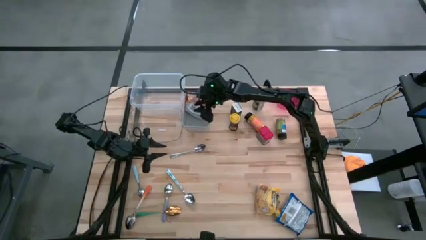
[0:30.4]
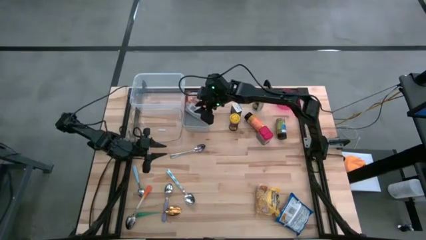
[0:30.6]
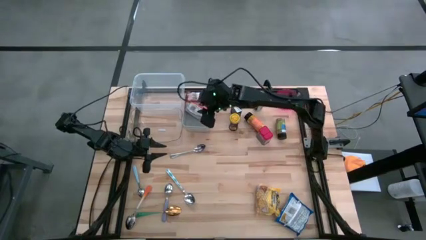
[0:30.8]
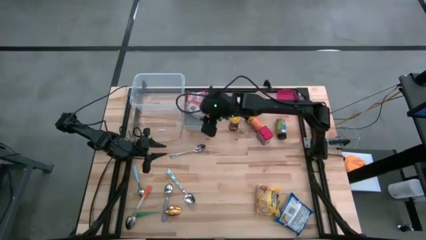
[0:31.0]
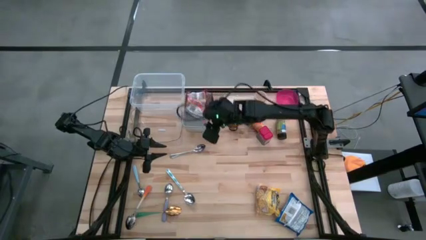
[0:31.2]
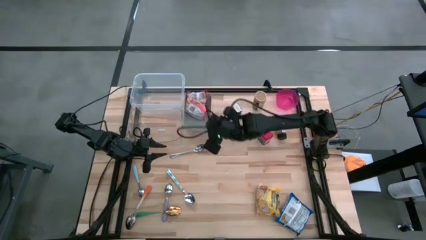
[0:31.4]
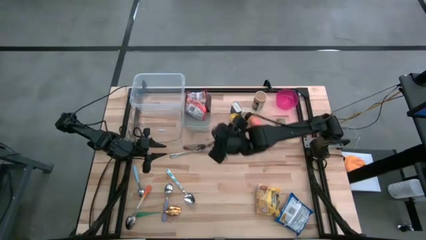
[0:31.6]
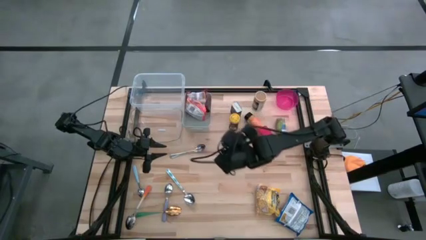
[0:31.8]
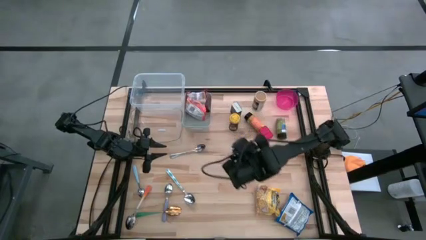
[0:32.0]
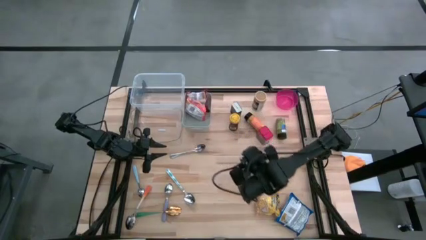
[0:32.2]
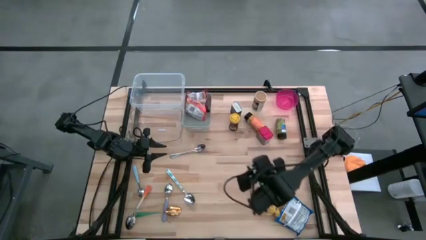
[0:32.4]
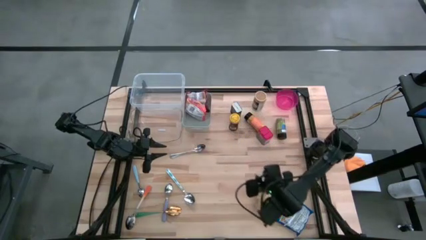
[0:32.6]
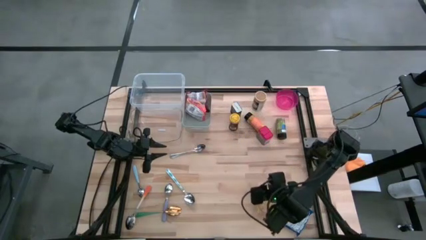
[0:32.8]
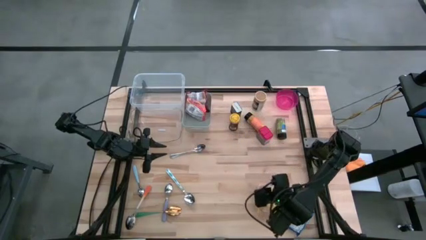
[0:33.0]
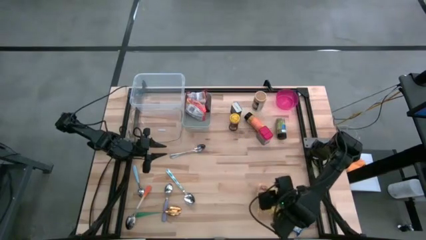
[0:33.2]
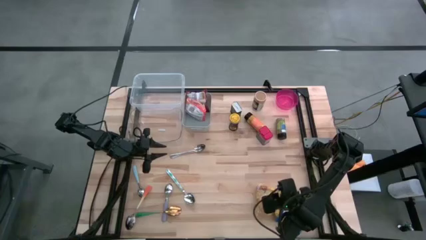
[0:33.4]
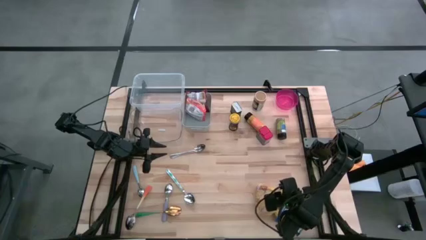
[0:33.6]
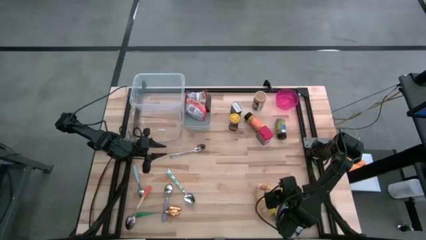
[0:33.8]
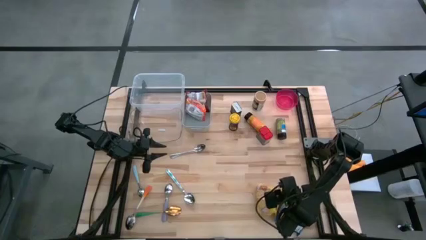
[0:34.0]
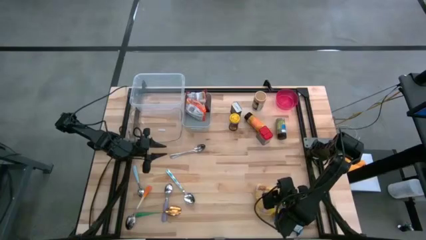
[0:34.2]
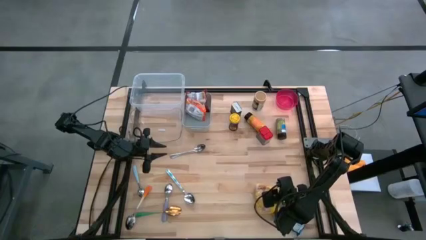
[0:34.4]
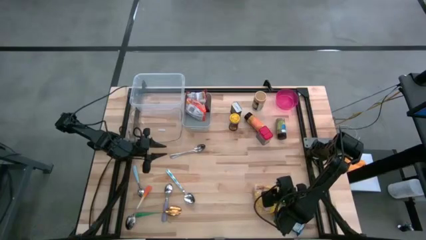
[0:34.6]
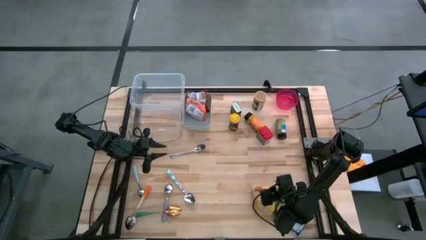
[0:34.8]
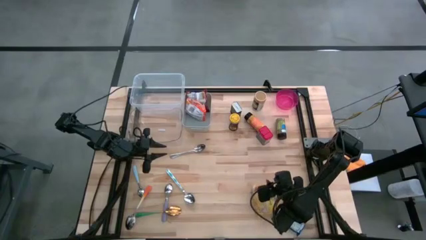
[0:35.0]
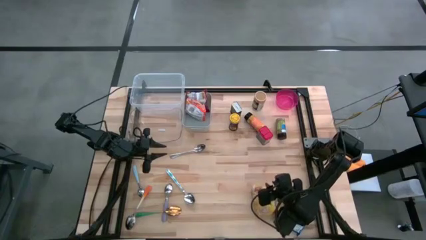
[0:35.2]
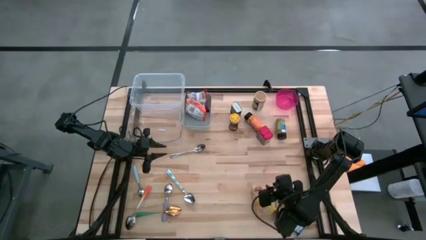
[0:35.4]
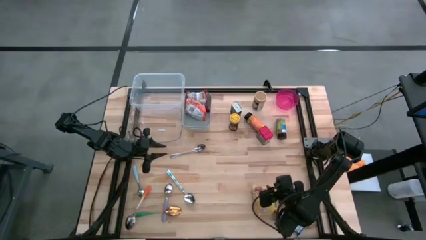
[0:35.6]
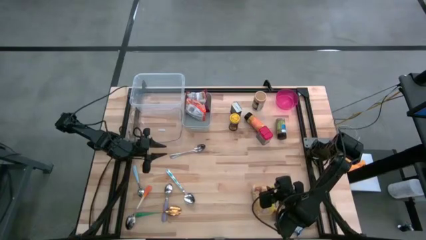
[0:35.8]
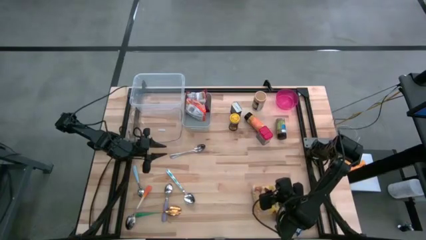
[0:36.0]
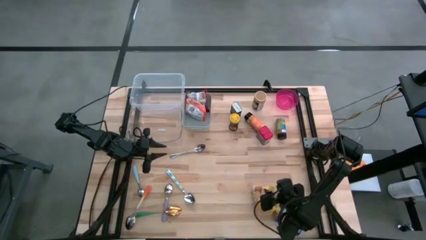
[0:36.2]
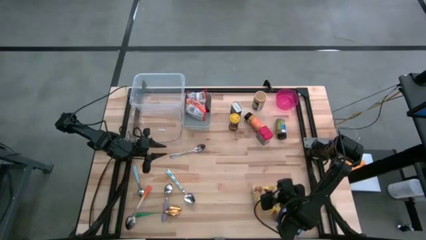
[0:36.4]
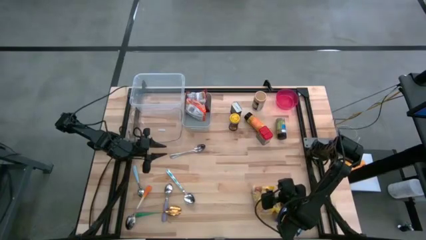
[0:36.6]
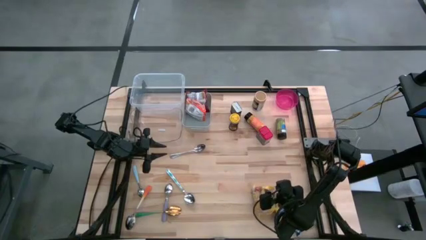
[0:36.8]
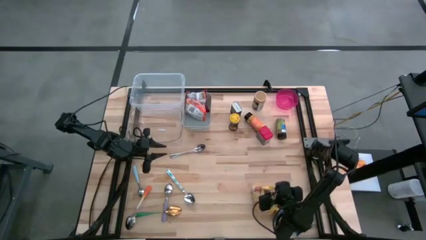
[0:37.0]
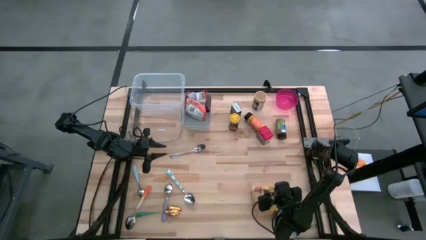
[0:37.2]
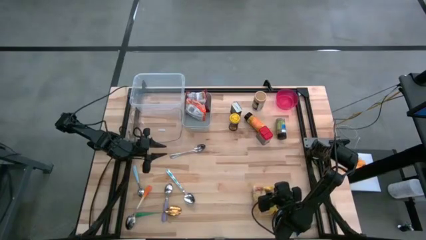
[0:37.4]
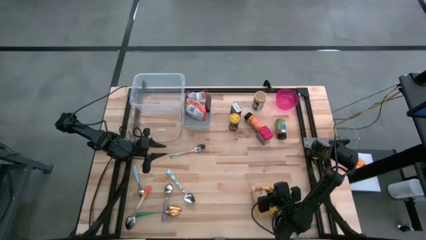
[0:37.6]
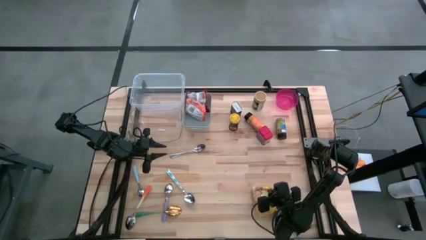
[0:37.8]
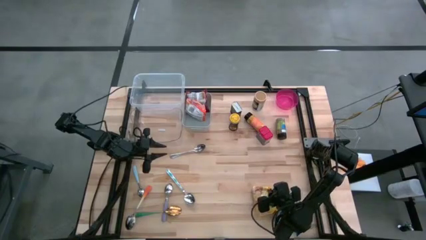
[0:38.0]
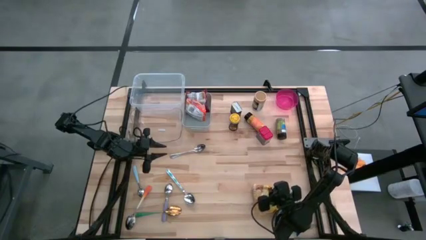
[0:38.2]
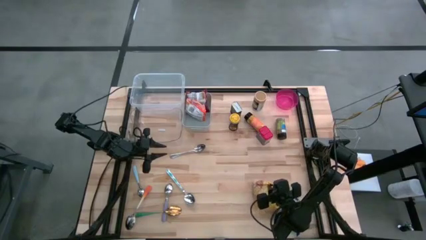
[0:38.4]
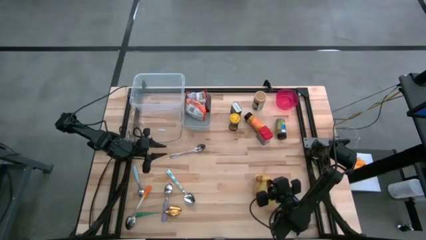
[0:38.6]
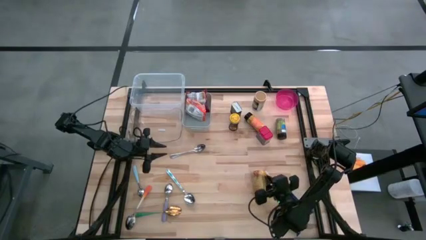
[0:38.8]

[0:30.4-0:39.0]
Put the yellow noodle pack into the gray bin

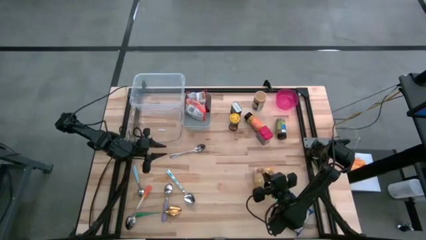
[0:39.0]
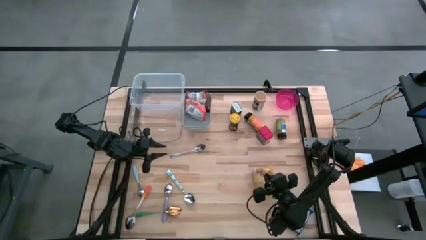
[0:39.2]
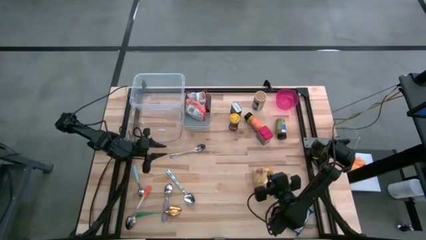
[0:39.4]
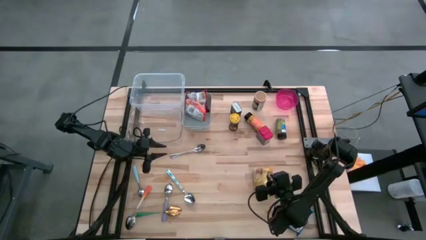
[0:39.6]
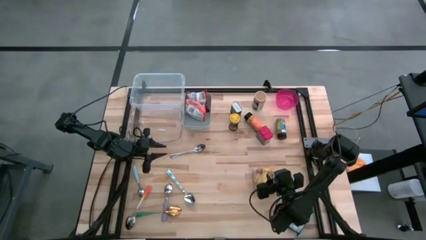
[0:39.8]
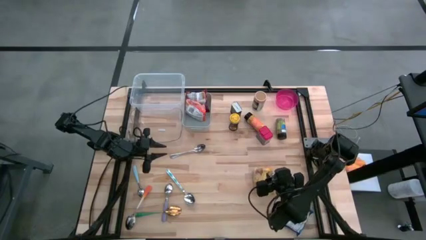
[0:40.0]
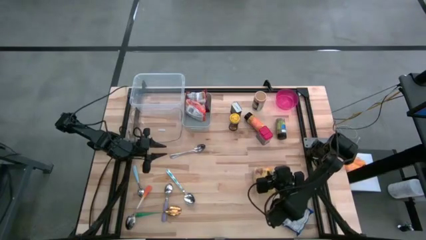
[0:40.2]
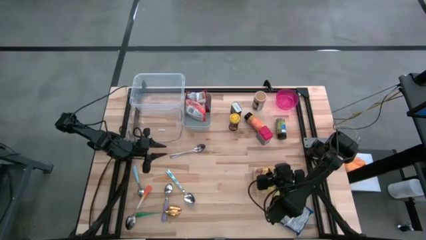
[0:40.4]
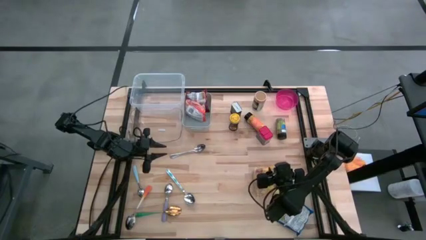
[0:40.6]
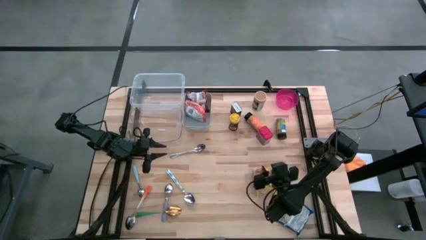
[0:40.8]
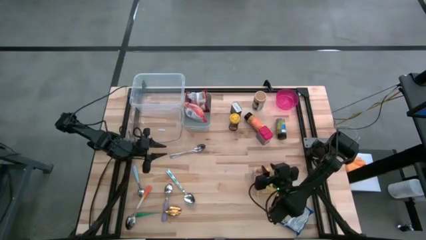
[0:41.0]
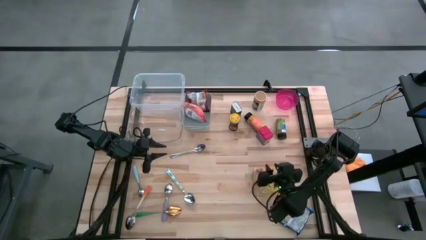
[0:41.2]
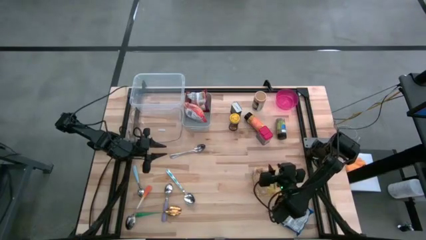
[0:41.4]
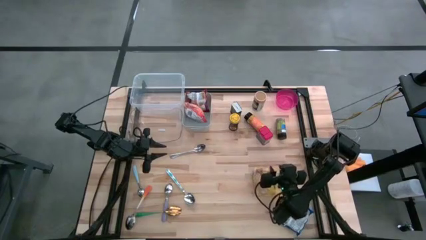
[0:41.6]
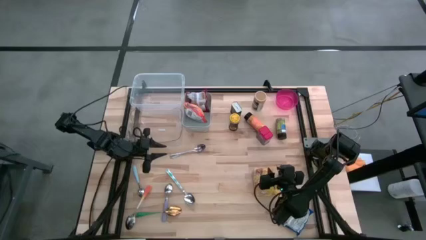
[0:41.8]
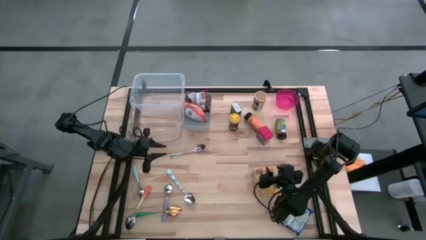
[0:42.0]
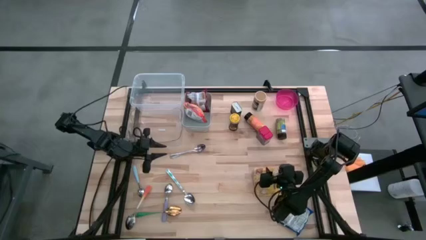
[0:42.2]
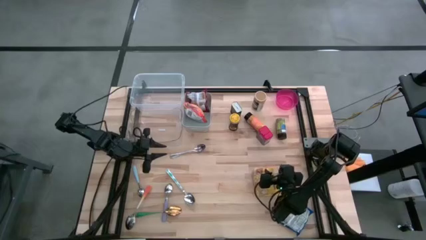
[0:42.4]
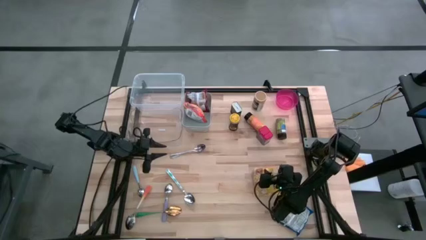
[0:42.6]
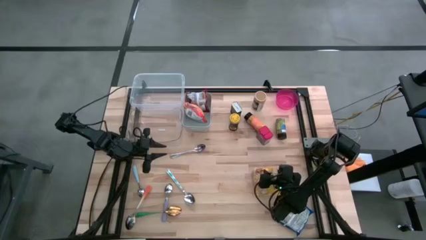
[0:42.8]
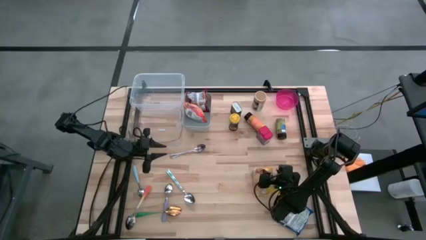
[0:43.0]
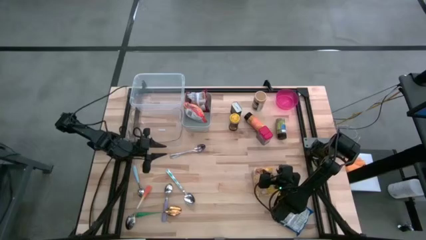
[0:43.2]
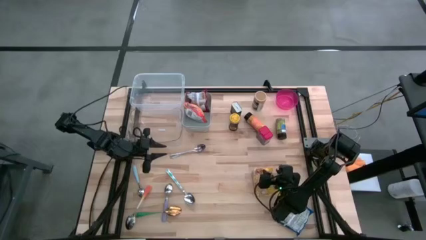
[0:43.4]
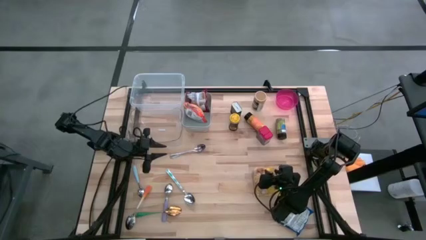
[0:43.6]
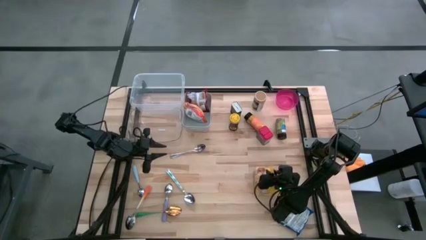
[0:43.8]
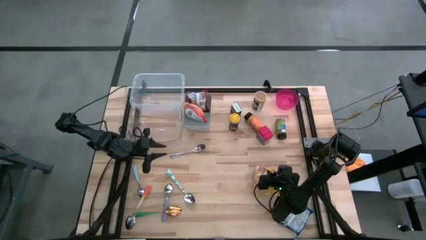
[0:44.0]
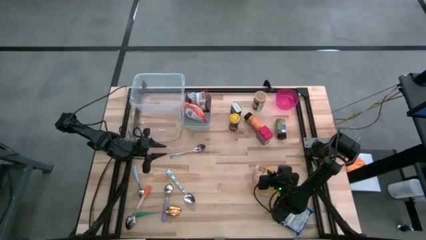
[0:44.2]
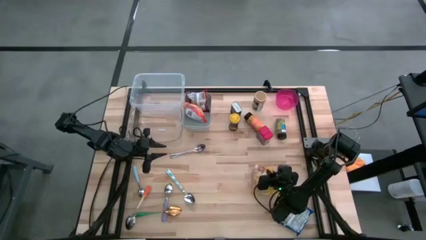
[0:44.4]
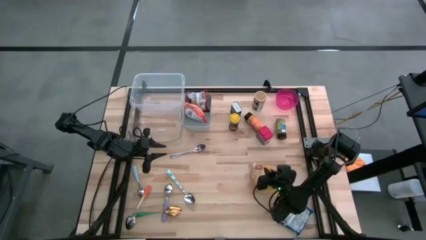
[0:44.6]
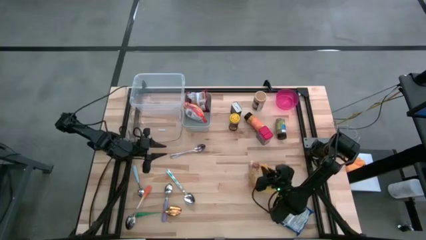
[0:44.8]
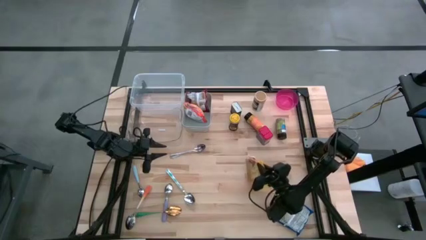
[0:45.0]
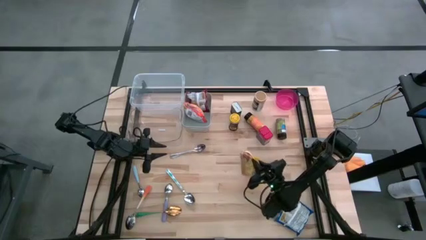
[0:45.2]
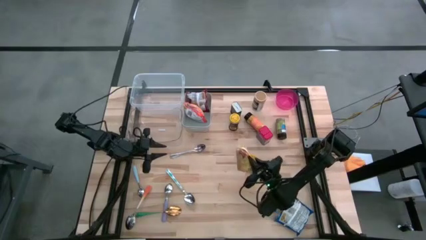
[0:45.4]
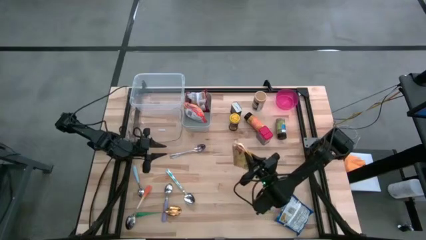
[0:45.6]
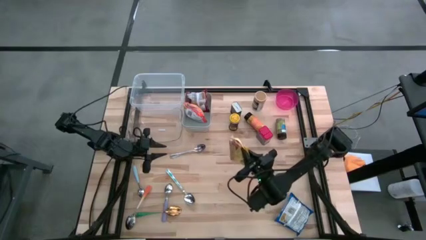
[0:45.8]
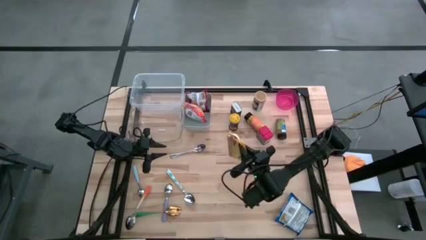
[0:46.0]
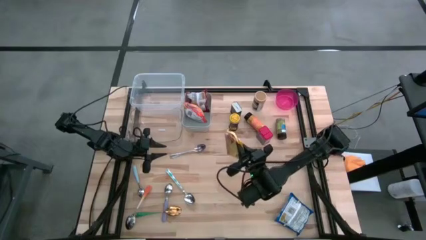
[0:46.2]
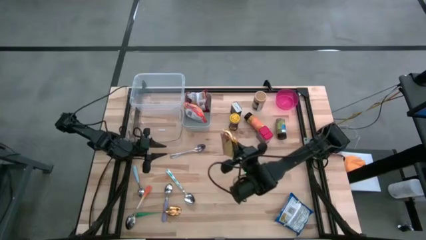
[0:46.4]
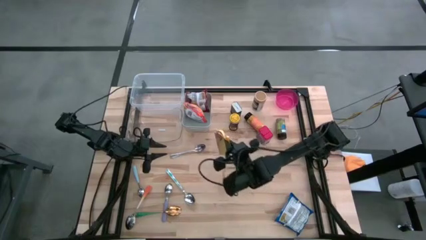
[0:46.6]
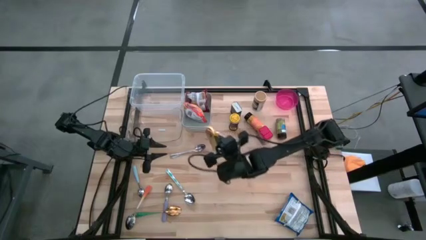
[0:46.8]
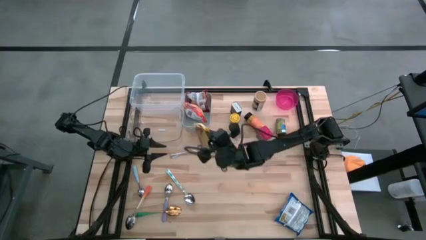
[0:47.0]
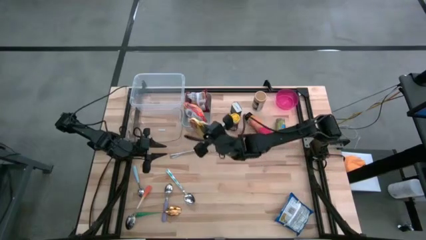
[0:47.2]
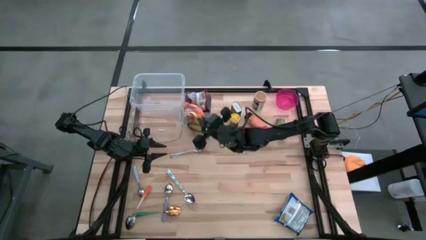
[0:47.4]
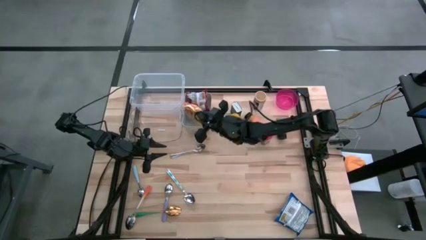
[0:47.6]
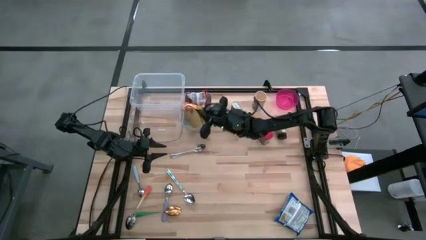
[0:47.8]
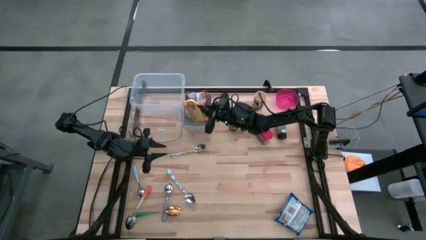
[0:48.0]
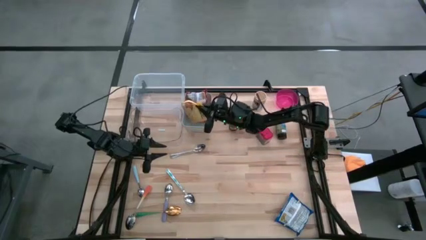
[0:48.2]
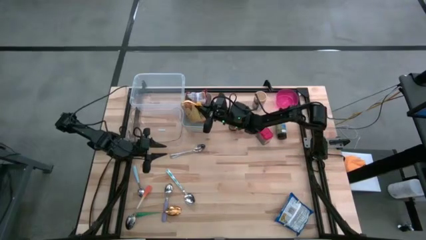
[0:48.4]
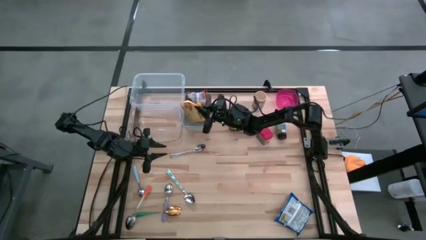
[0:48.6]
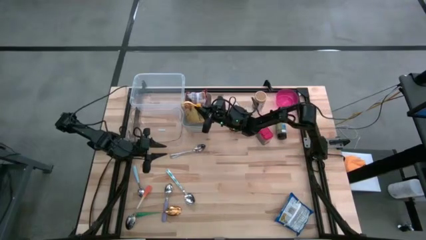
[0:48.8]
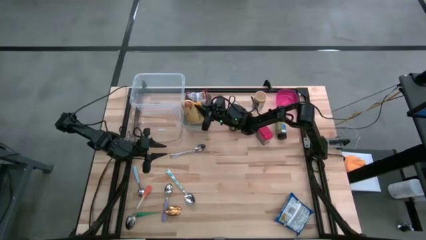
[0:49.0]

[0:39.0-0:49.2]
Put the yellow noodle pack into the gray bin
